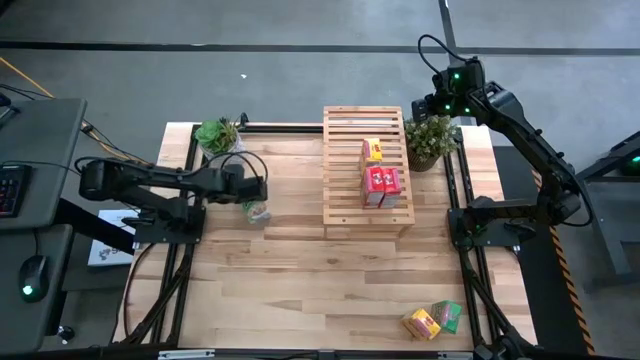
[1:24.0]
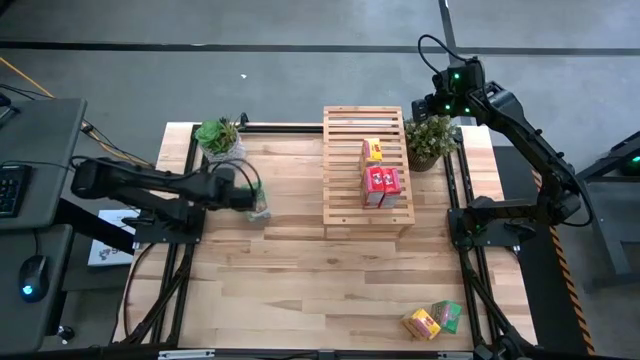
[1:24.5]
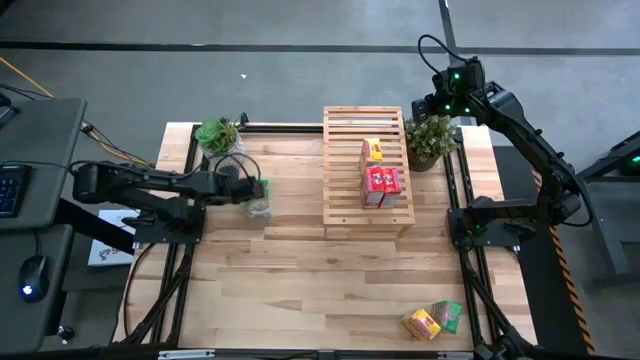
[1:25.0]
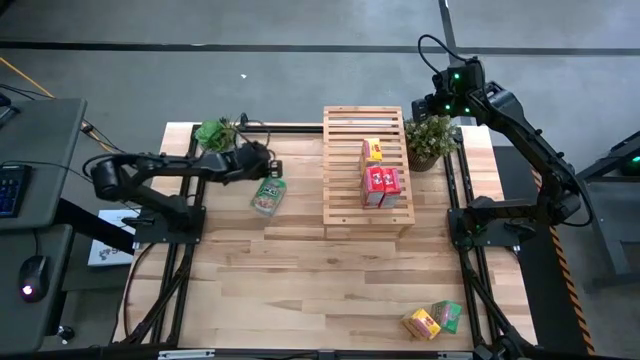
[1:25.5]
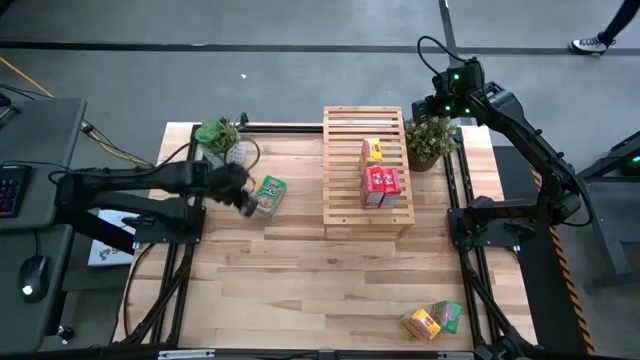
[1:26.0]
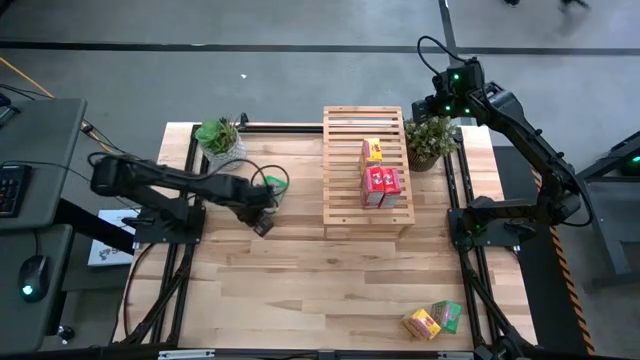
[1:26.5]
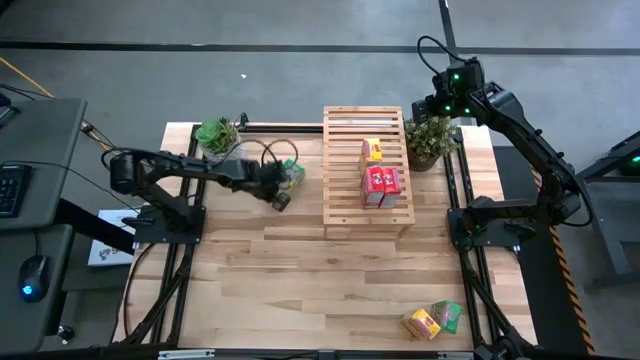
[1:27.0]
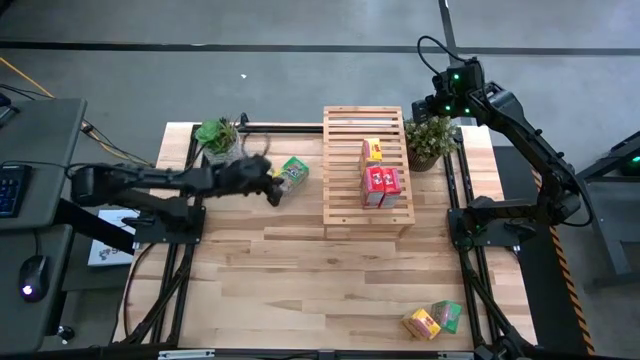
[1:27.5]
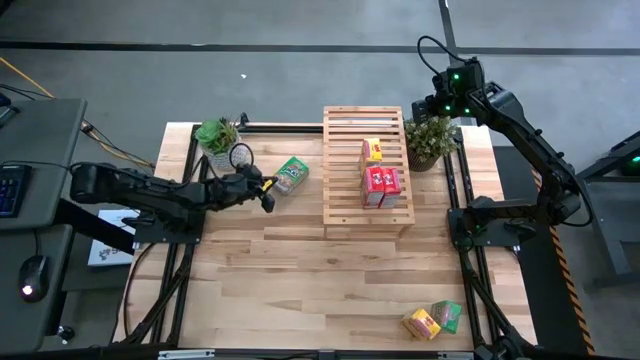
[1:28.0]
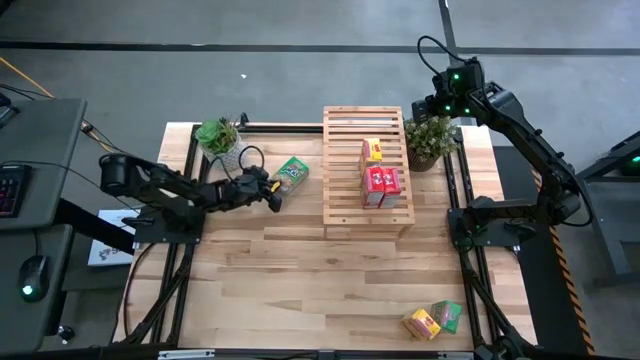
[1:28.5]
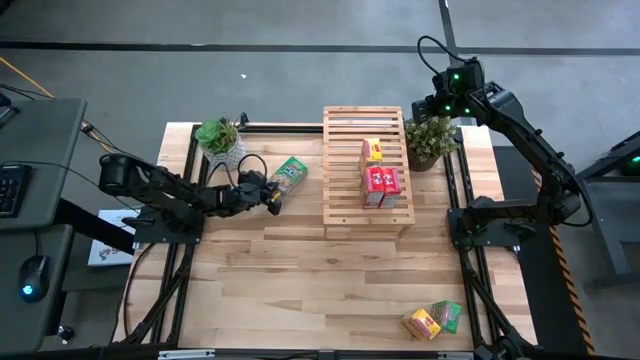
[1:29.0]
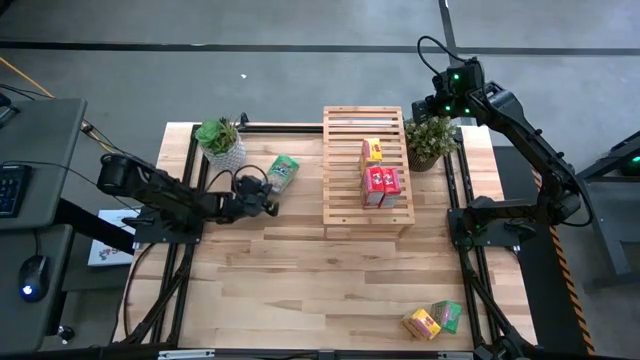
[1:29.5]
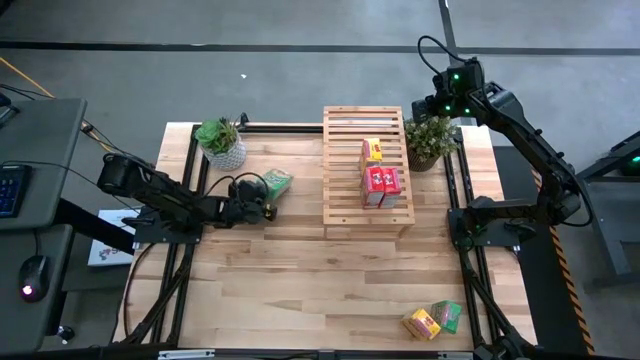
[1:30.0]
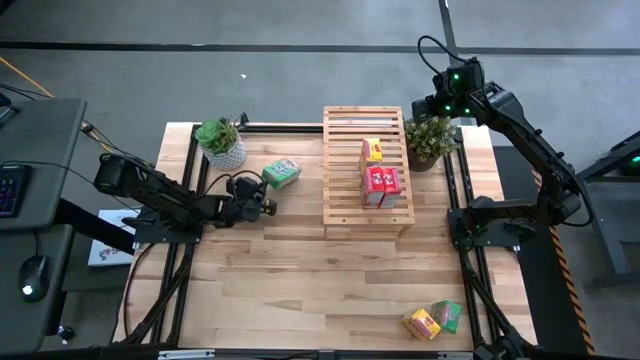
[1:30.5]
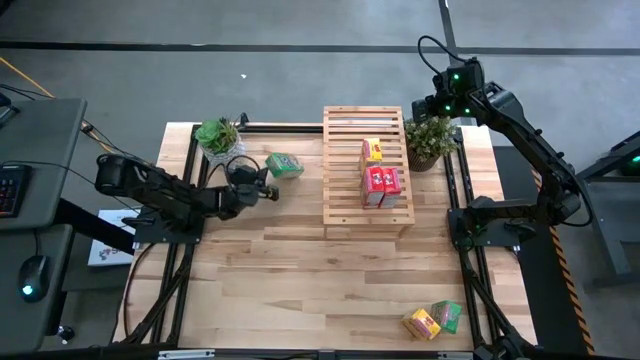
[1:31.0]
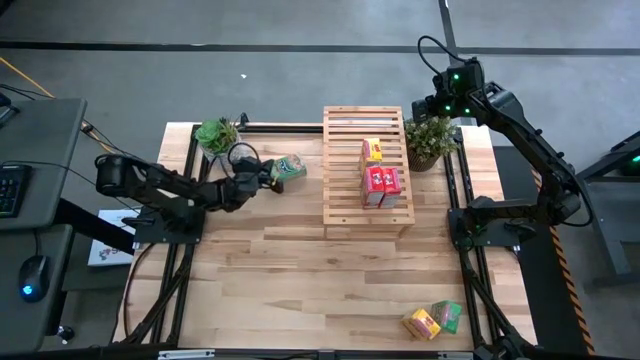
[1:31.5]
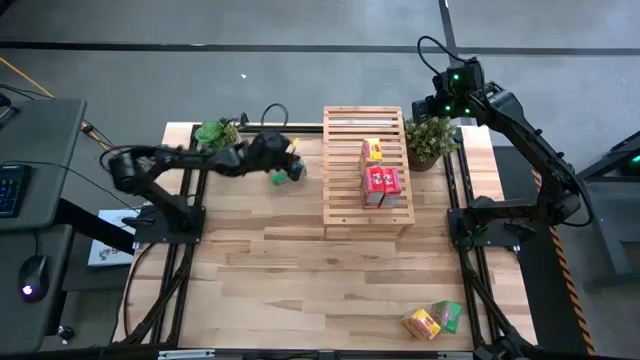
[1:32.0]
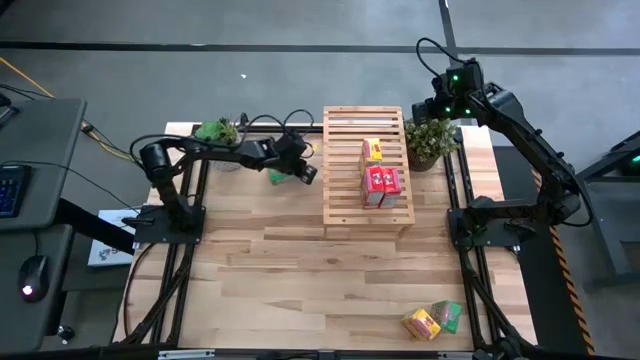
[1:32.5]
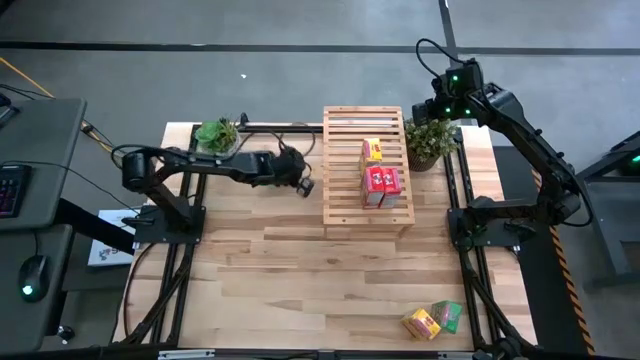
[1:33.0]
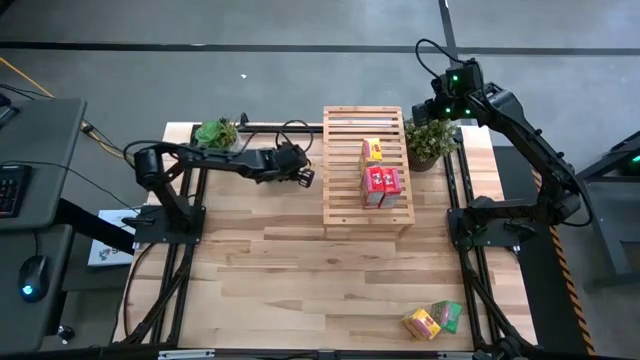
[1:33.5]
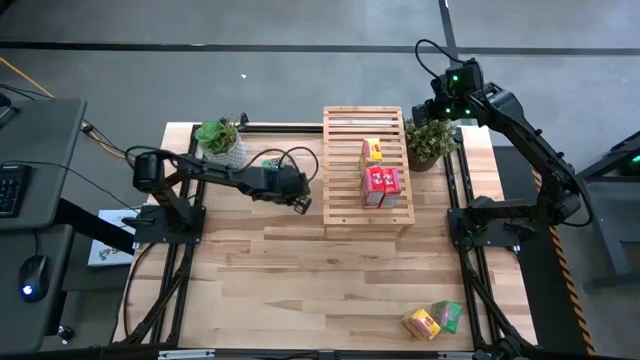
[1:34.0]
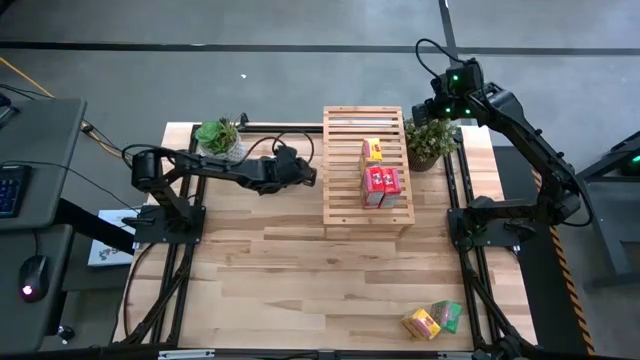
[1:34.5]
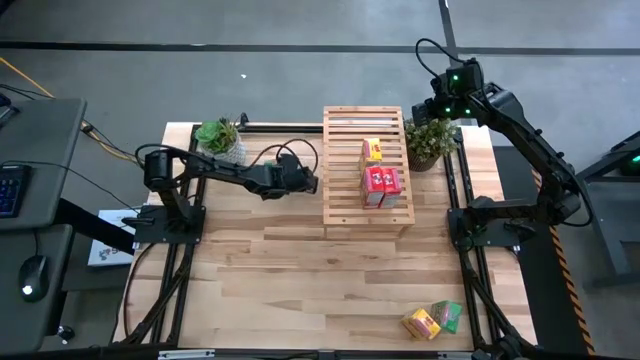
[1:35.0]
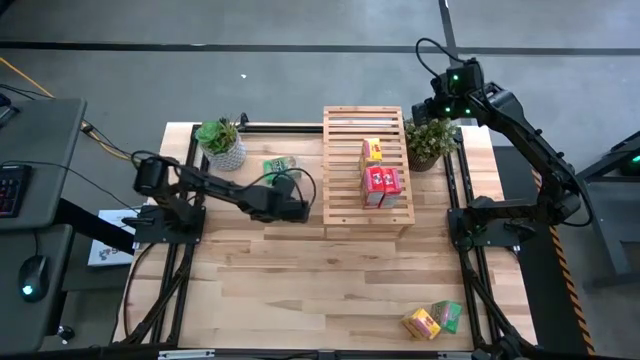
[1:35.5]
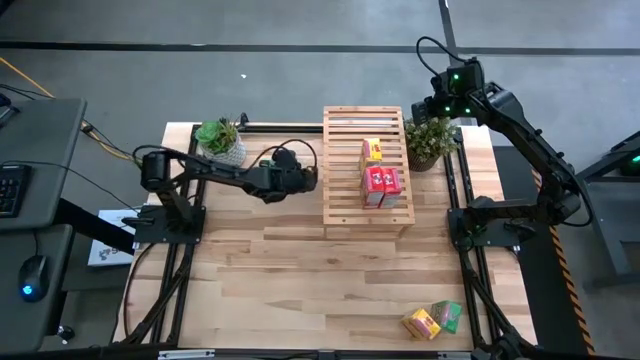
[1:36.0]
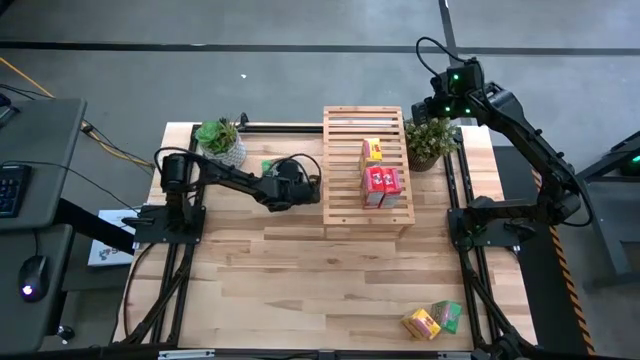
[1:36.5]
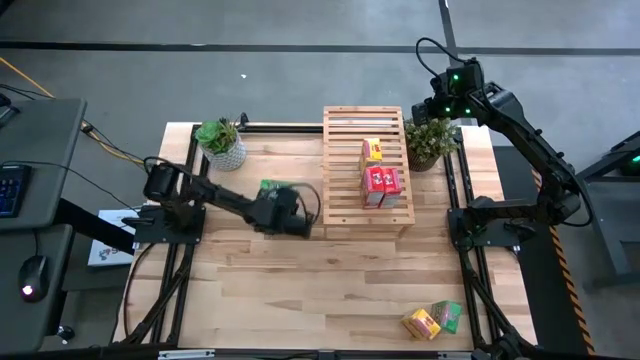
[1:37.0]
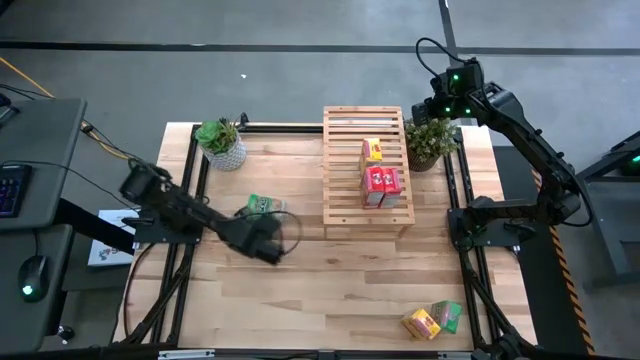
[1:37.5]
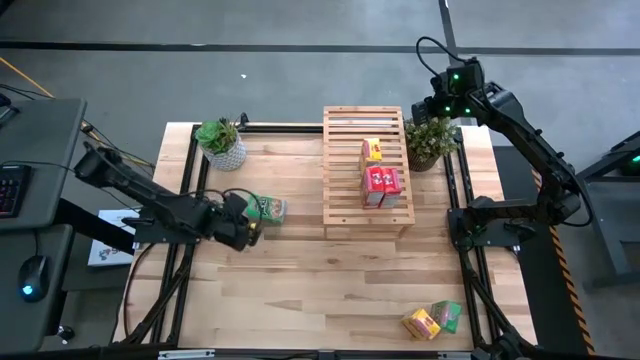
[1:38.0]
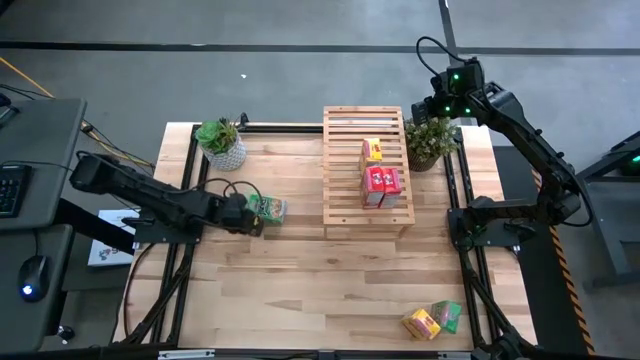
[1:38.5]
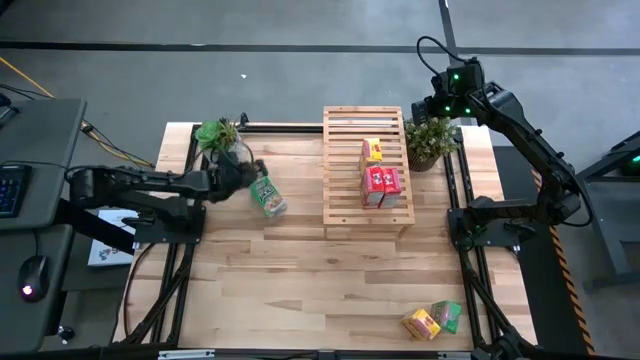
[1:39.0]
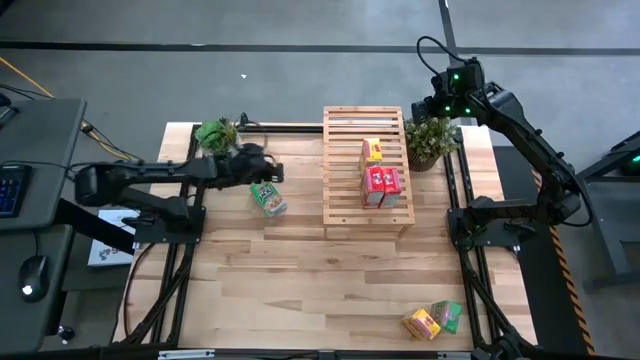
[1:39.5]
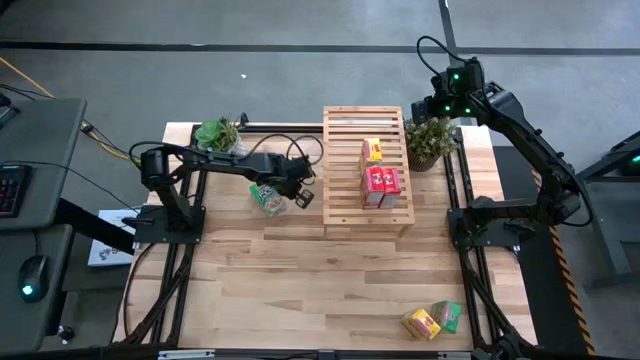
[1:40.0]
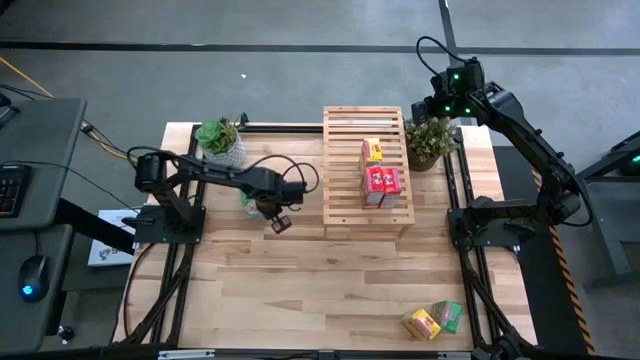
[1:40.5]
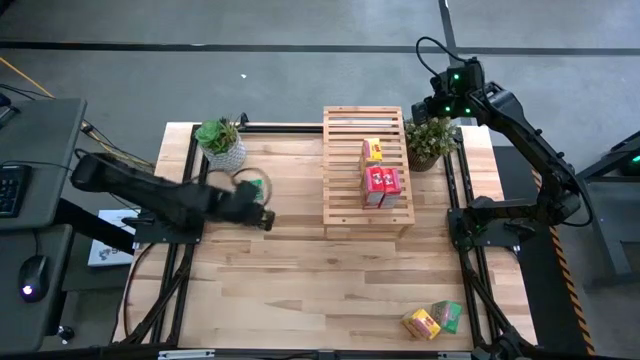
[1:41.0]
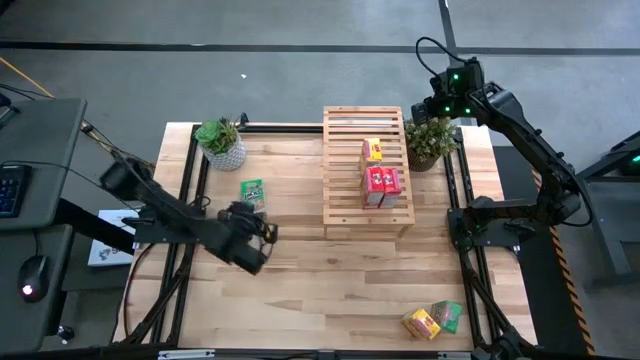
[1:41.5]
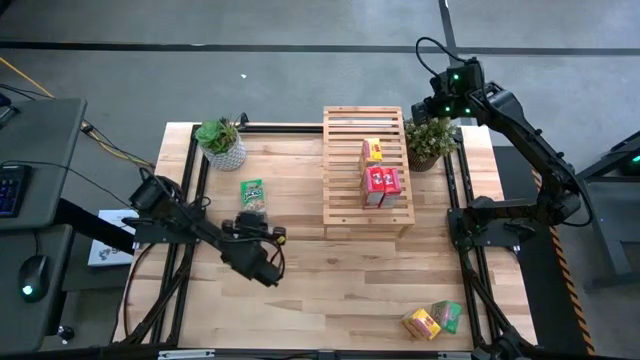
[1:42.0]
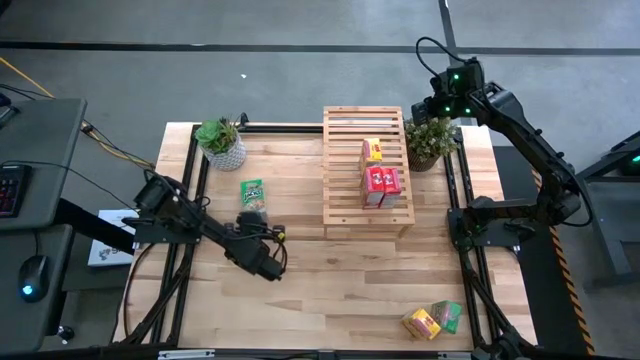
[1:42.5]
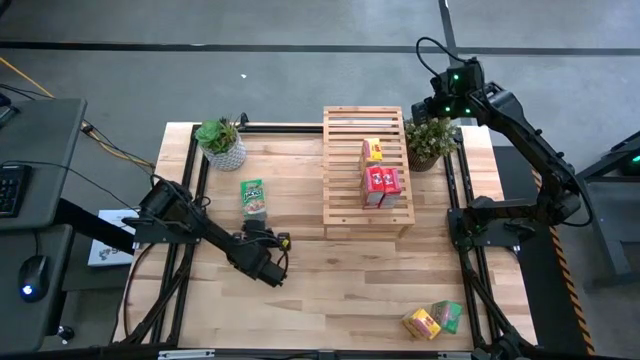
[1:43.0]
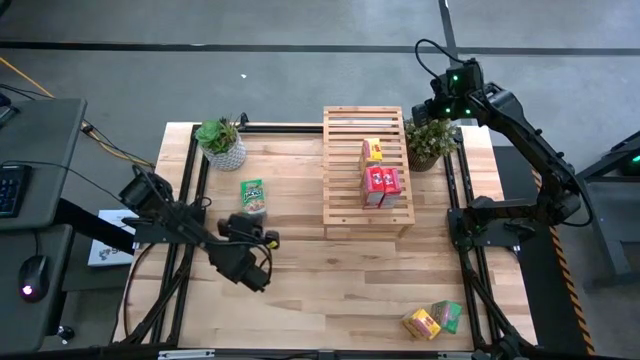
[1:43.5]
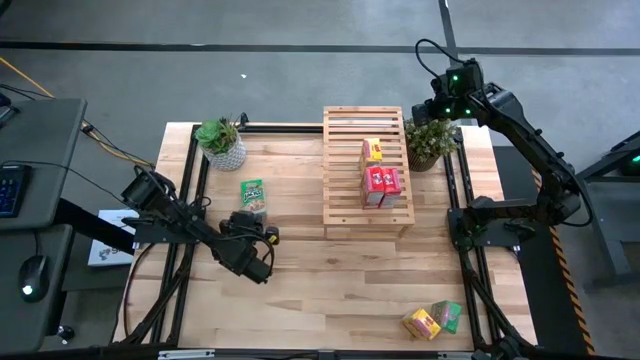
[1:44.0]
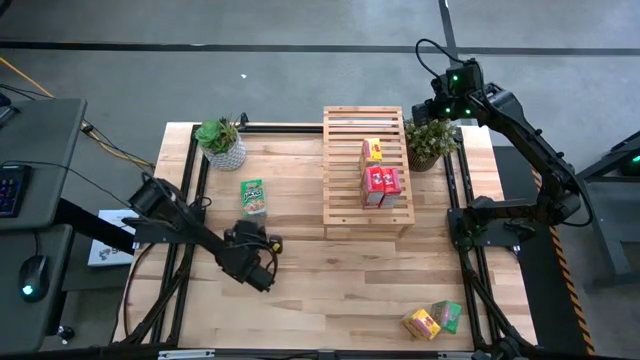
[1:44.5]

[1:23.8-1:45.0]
Task: Stack cereal on shelf
Put the top green cereal box on the shelf
